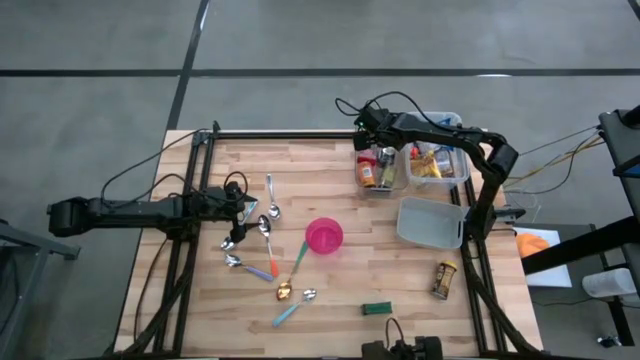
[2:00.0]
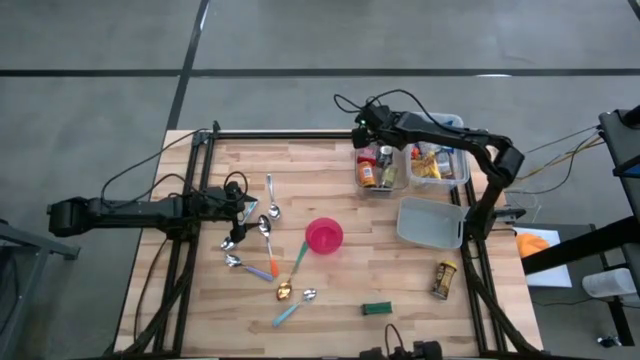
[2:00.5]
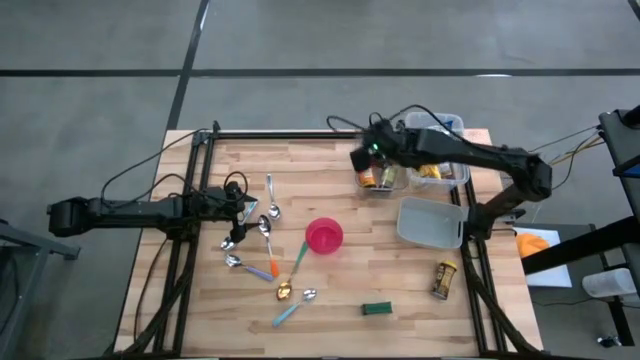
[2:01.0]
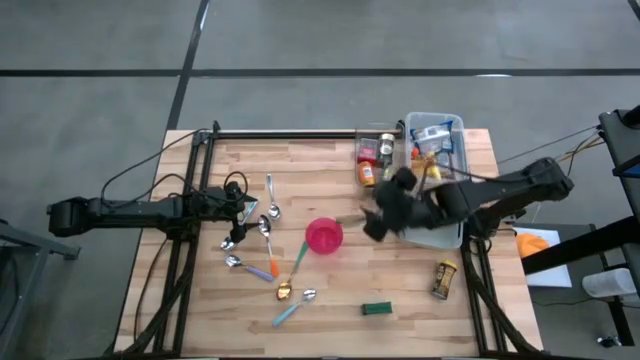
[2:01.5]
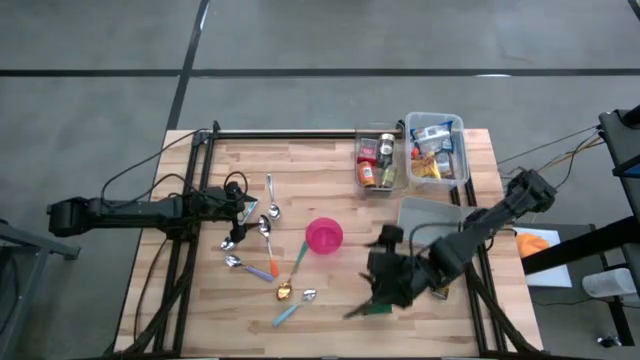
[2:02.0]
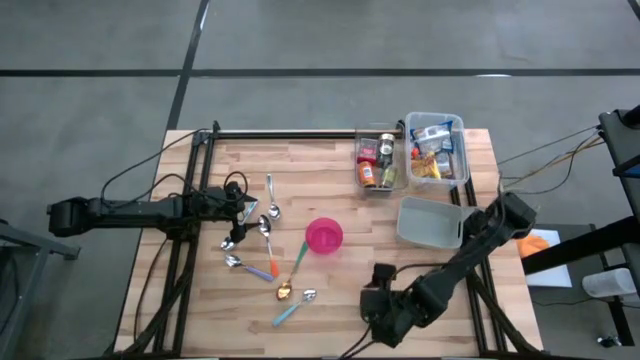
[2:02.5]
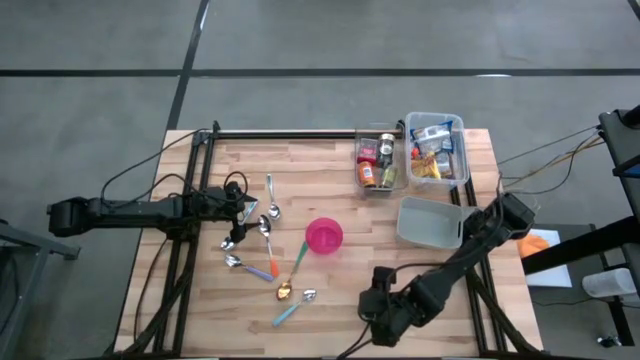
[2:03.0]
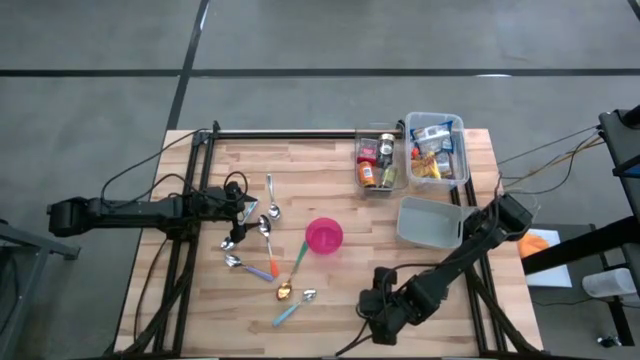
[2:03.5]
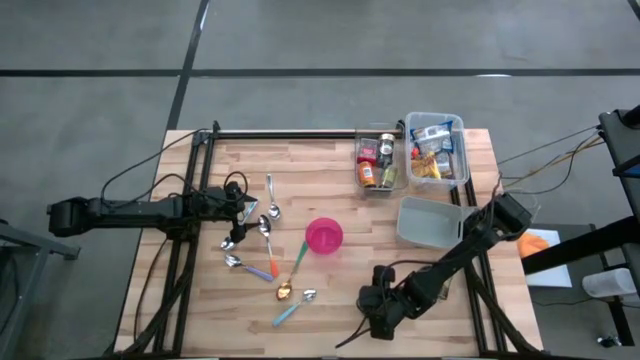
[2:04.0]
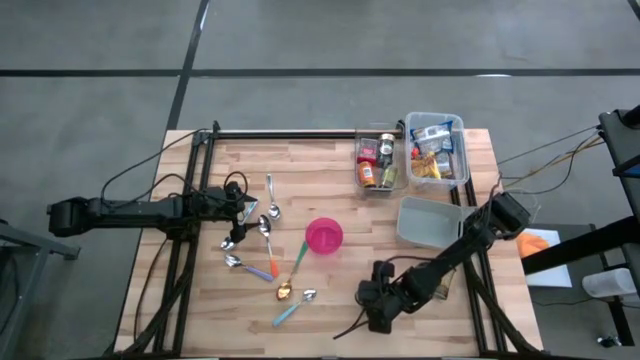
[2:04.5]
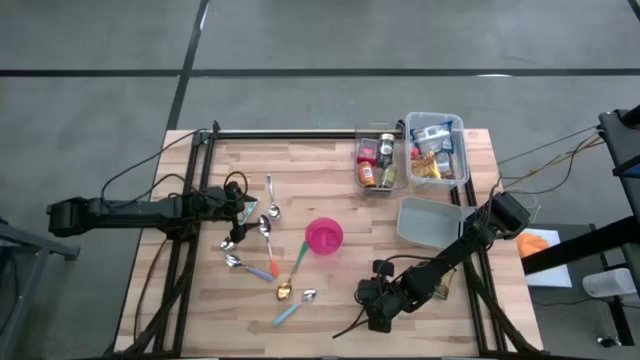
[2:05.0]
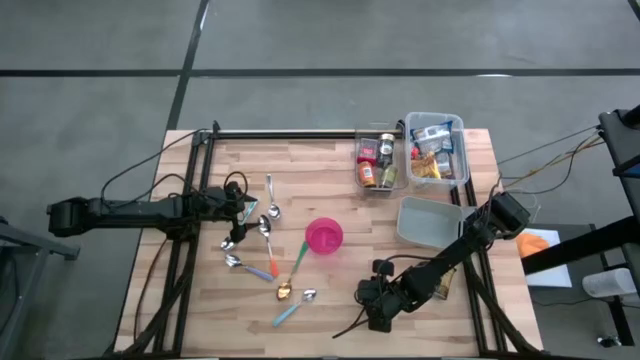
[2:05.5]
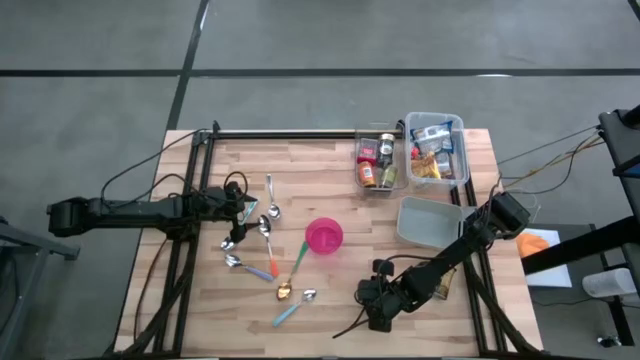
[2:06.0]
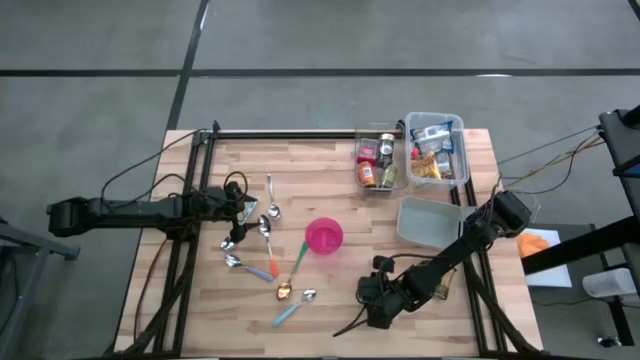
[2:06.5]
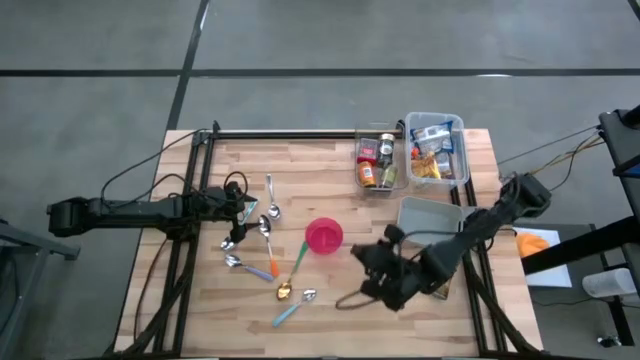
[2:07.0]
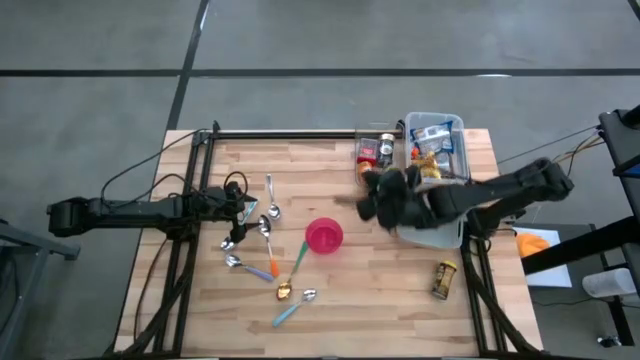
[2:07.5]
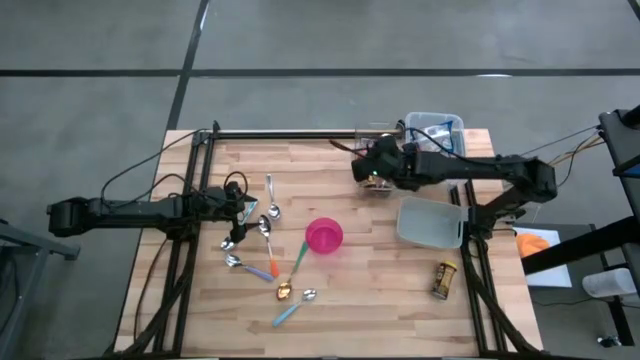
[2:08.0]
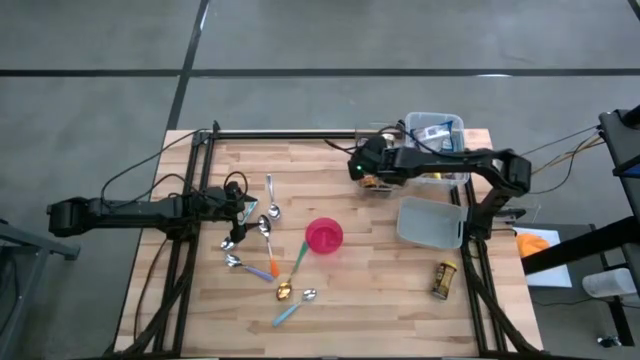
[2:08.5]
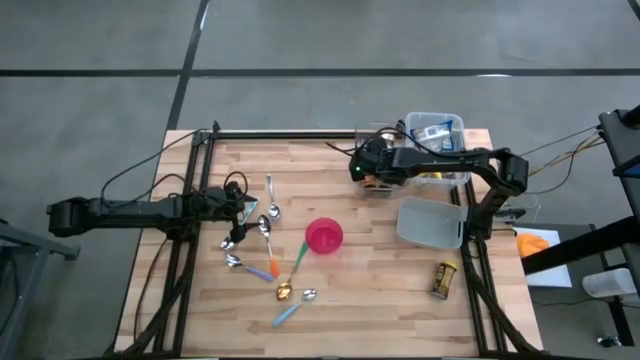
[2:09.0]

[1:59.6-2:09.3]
Put the black seasoning can into the transparent bin

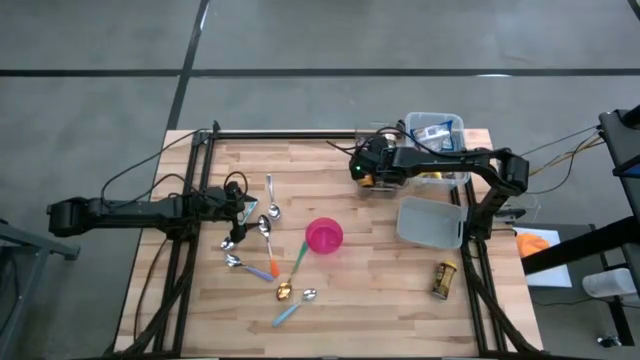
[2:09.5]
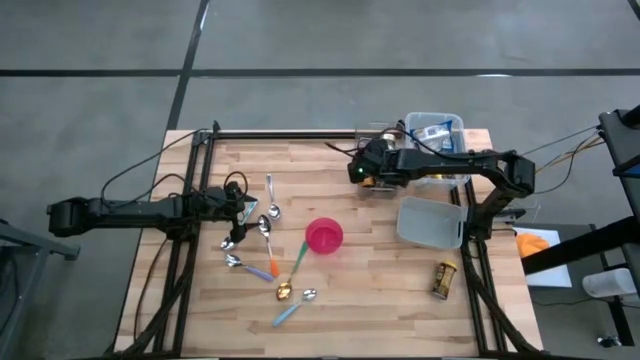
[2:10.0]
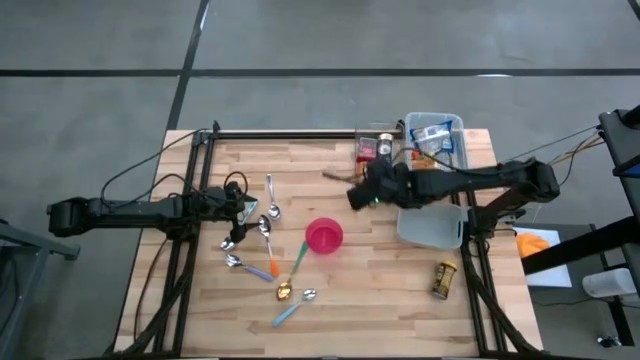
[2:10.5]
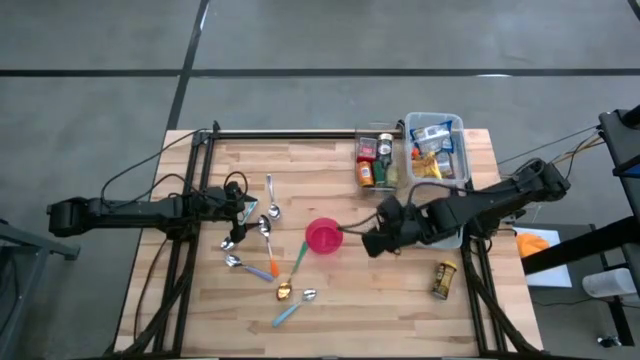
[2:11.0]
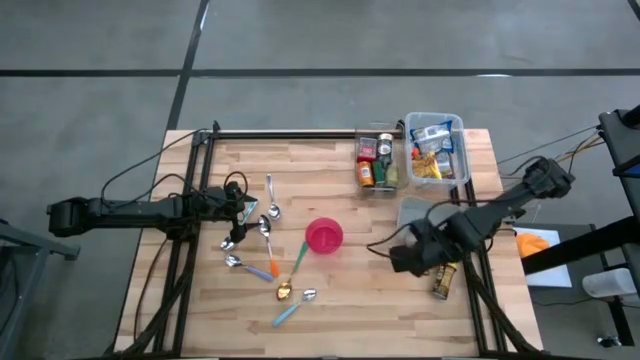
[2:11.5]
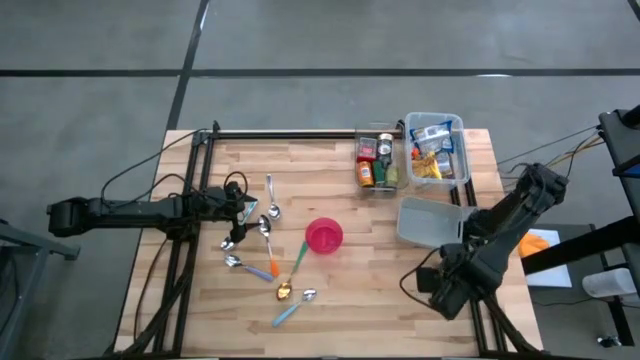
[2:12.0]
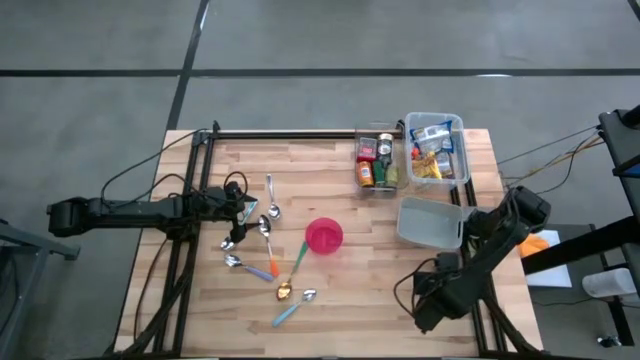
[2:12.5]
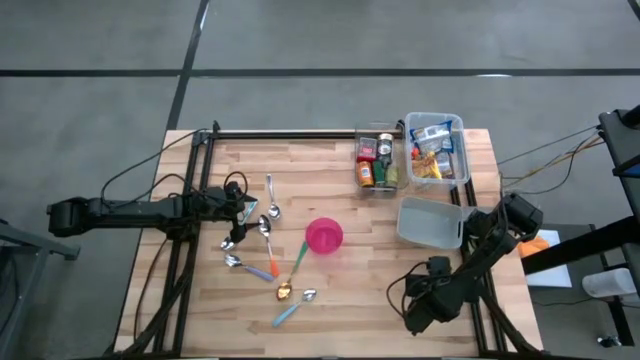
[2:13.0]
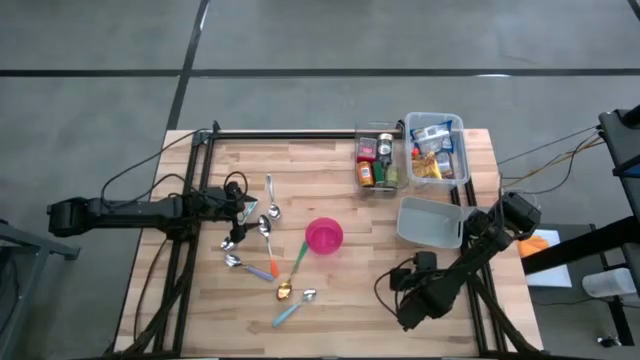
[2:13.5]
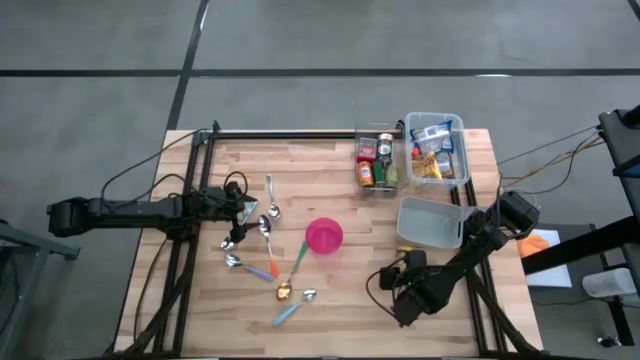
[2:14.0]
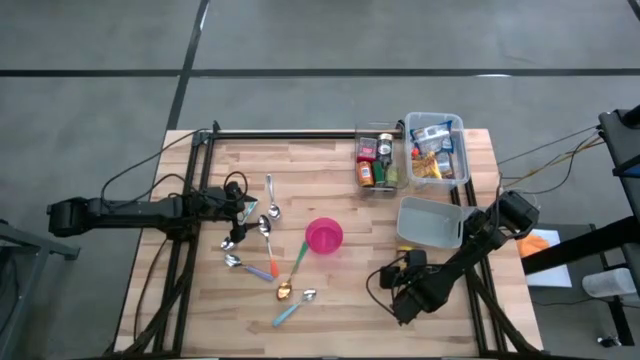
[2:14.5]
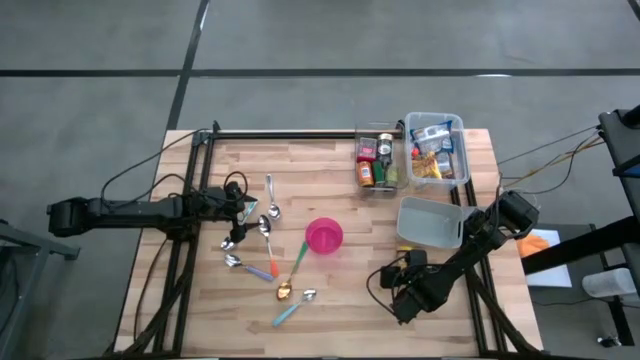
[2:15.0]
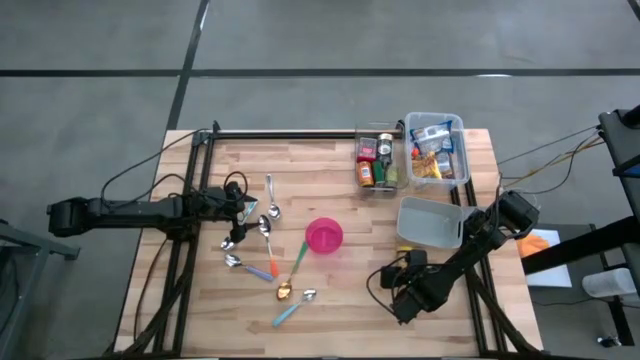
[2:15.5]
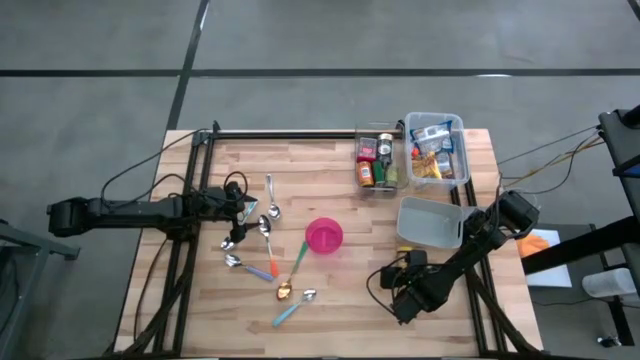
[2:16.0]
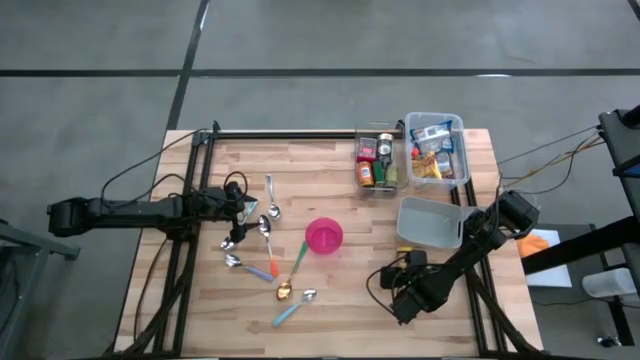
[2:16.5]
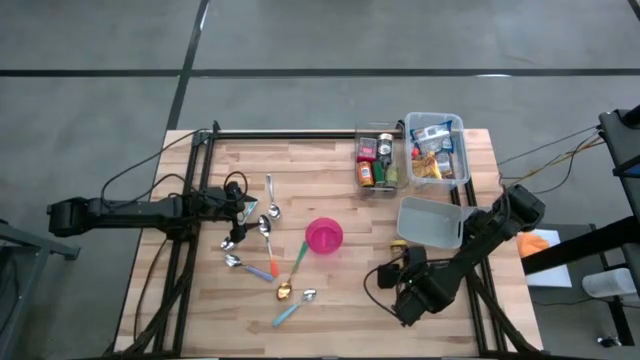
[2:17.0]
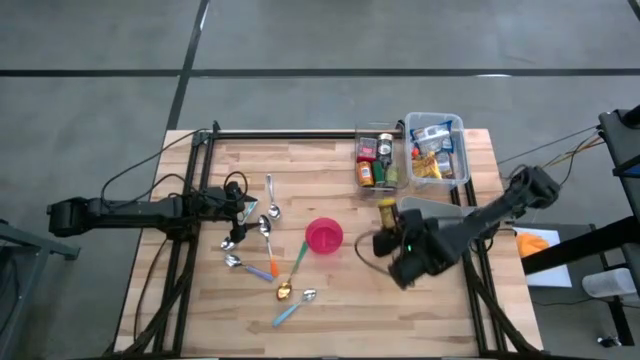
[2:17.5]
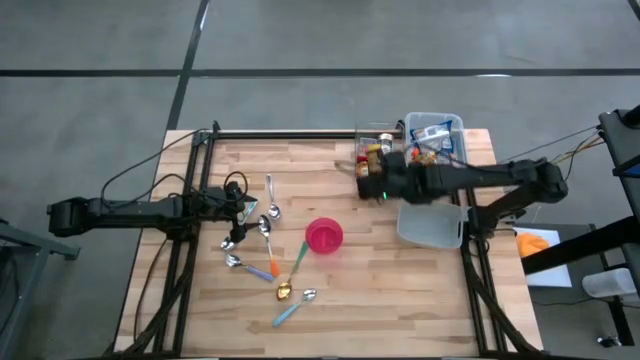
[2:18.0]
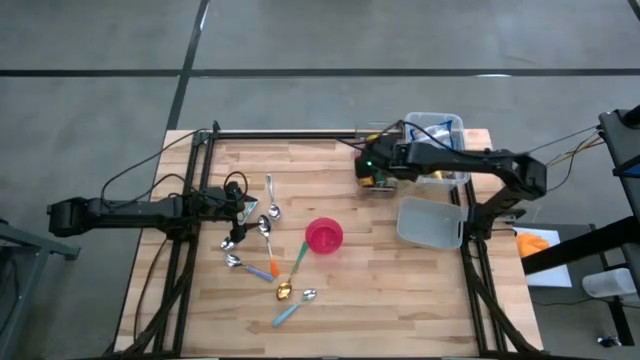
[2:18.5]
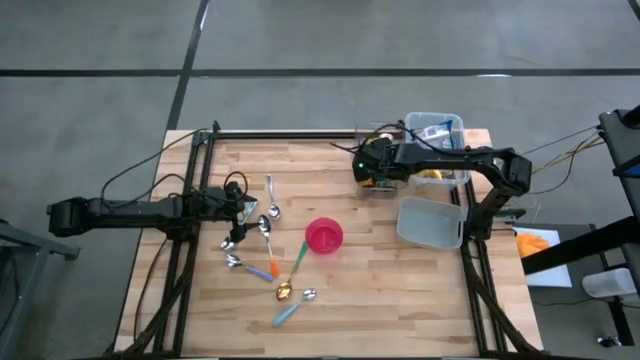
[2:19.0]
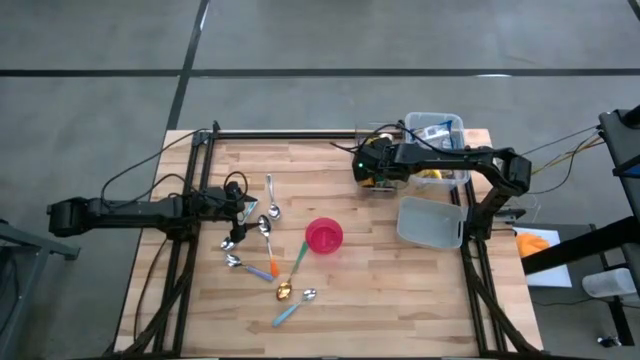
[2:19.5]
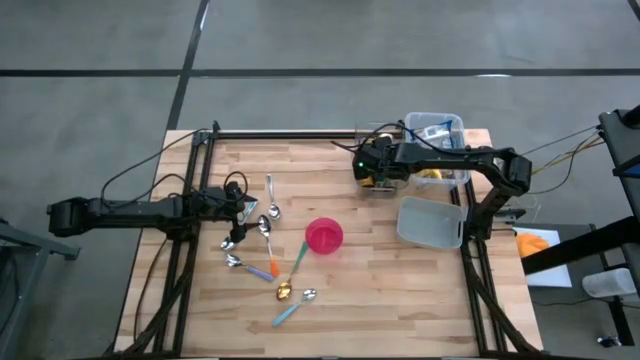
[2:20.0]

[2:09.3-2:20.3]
Put the yellow seasoning can into the transparent bin
